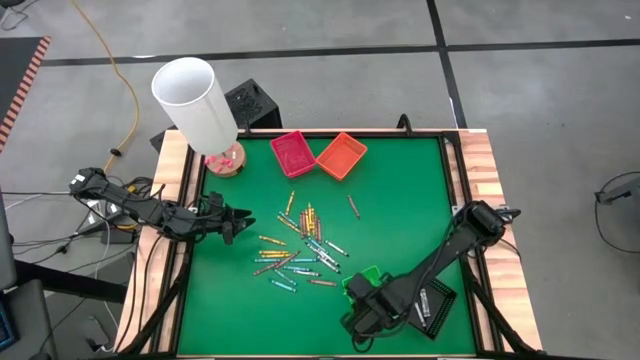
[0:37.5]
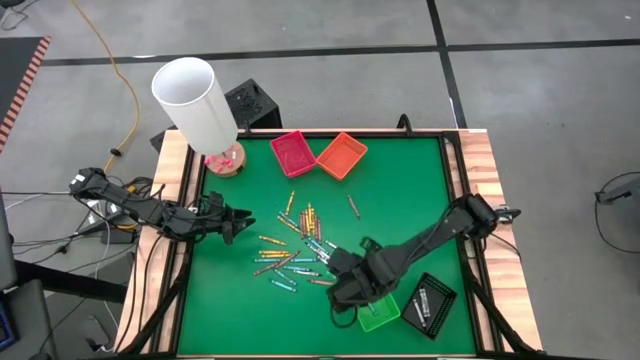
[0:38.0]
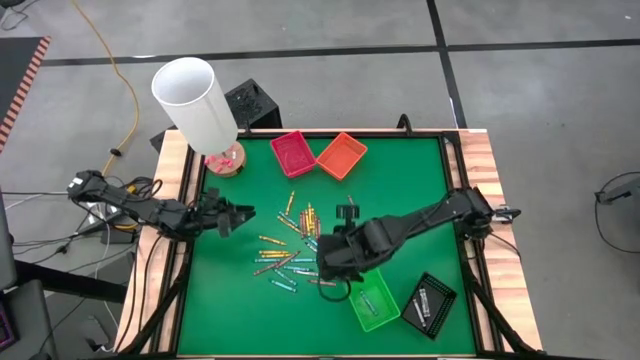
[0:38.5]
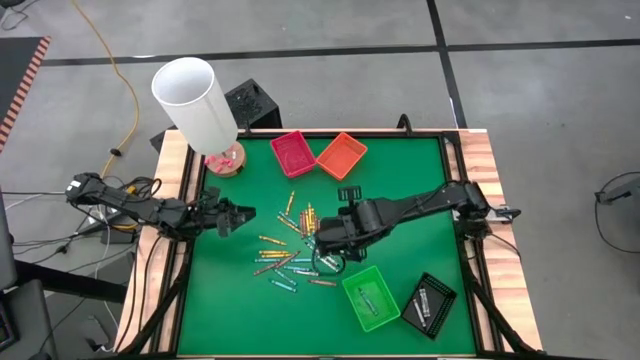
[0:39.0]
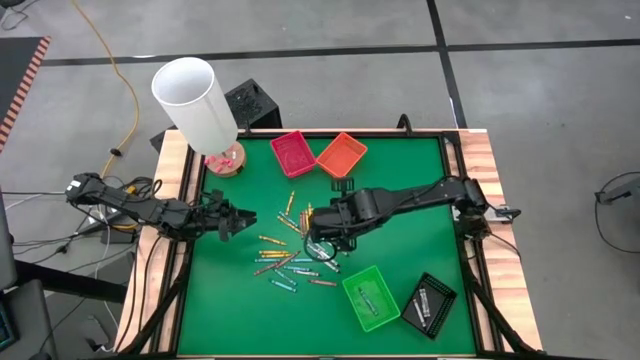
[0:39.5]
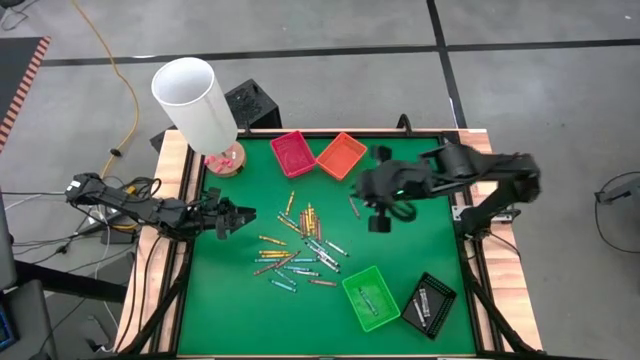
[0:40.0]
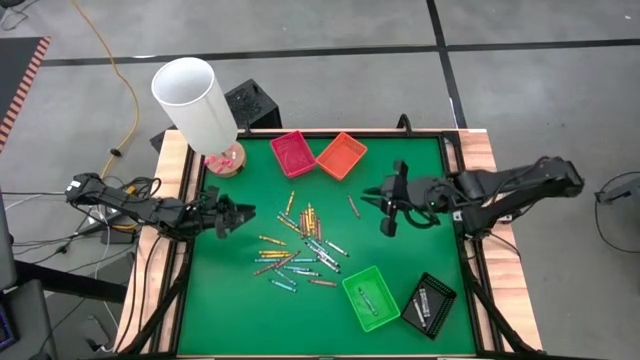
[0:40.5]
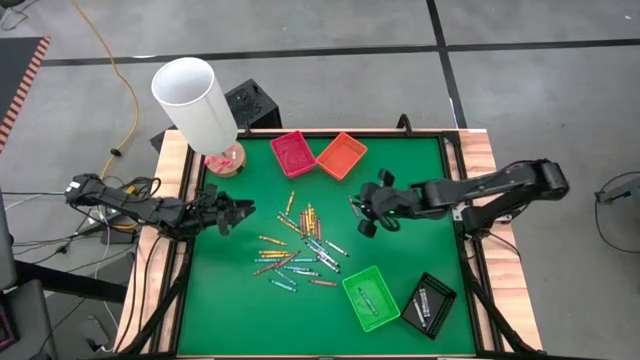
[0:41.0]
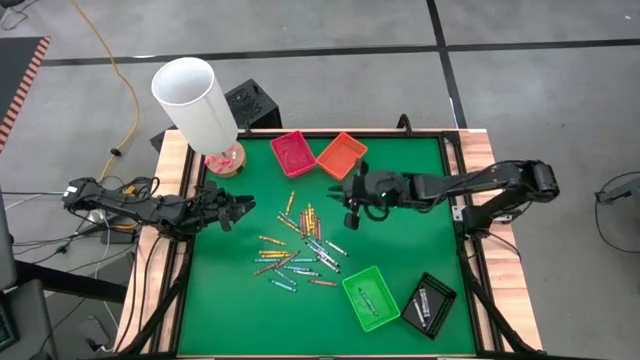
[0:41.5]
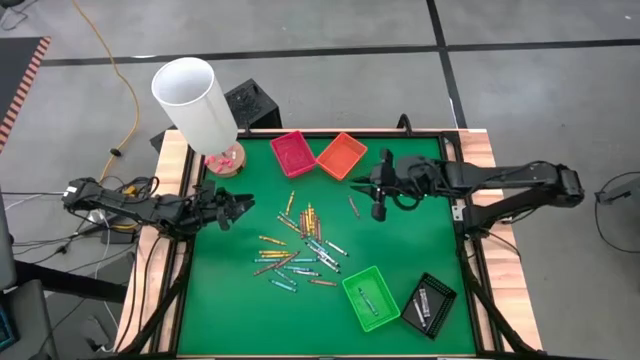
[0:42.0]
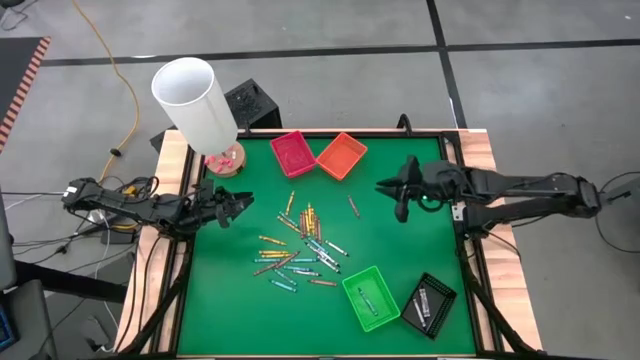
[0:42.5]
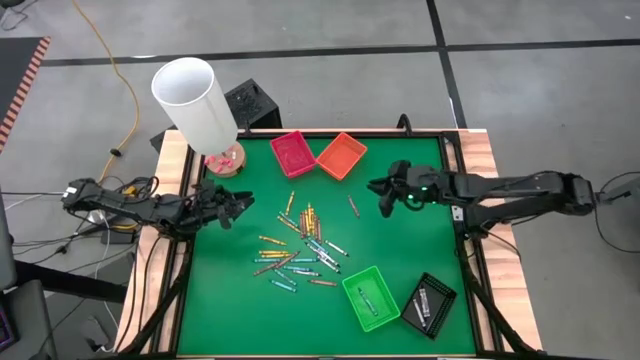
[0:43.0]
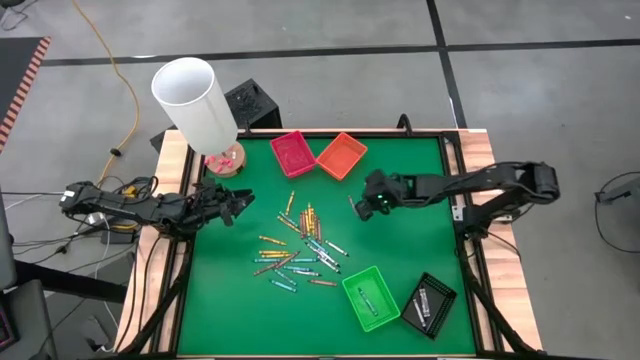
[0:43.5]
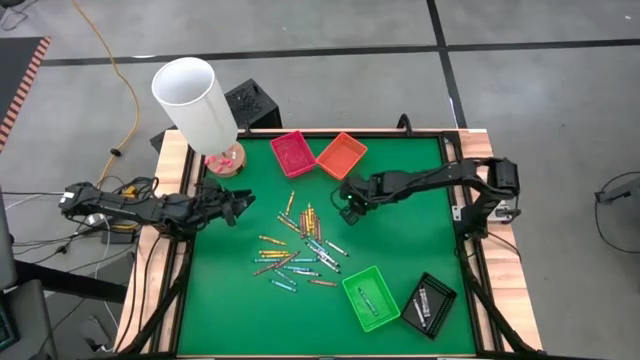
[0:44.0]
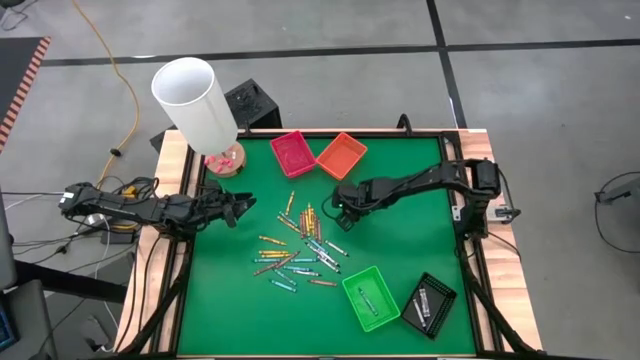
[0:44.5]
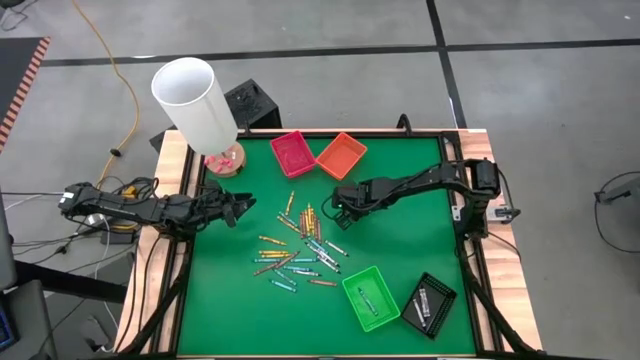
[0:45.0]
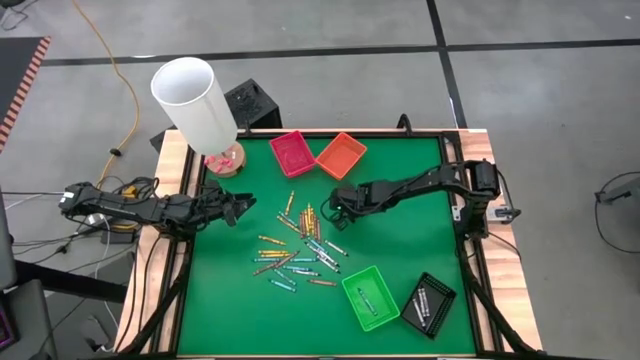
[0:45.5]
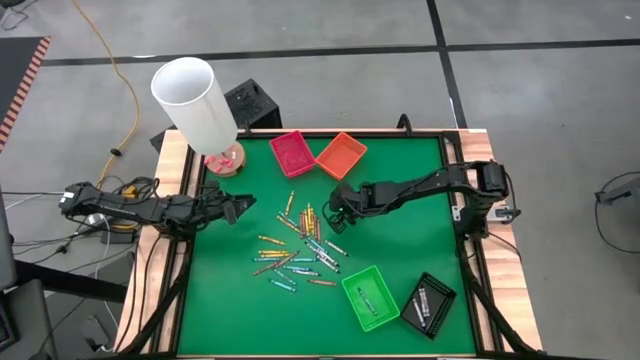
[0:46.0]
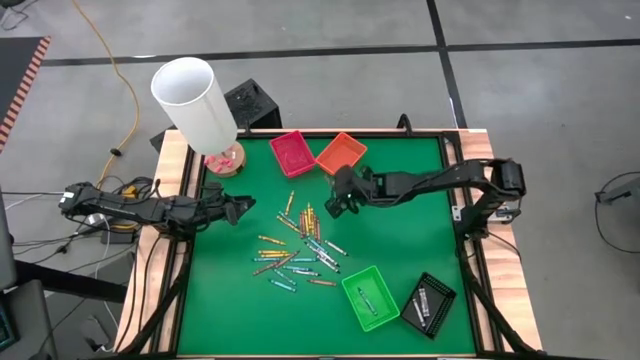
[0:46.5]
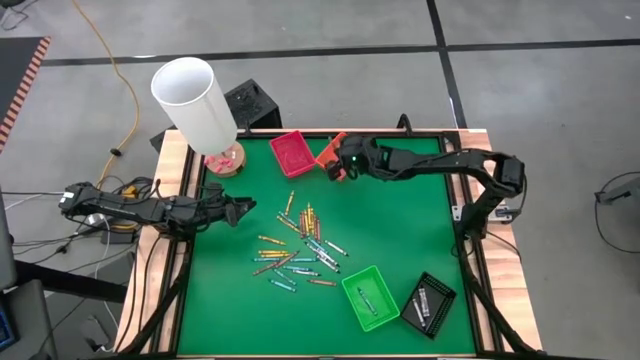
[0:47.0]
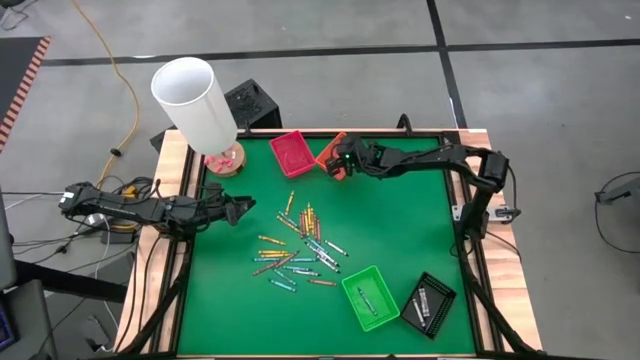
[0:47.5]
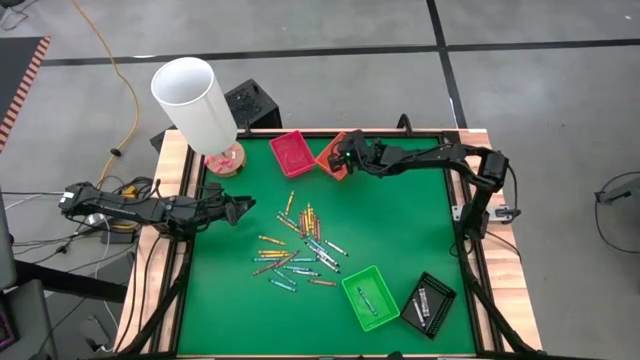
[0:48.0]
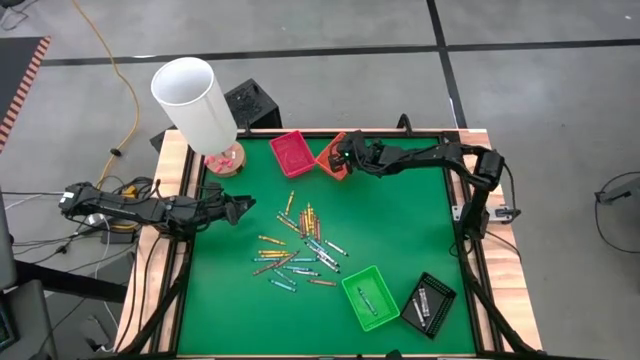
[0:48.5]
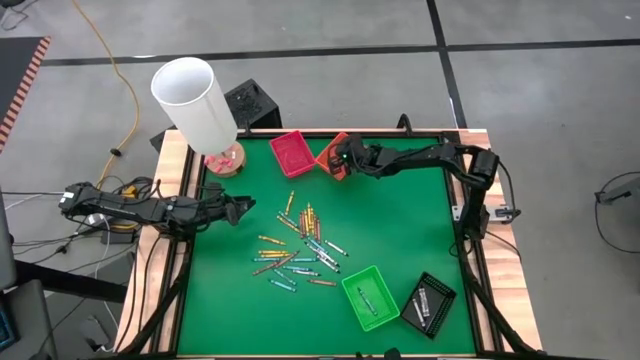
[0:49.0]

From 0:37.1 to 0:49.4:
Task: Sort crayons
Put the brown crayon into the orange bin

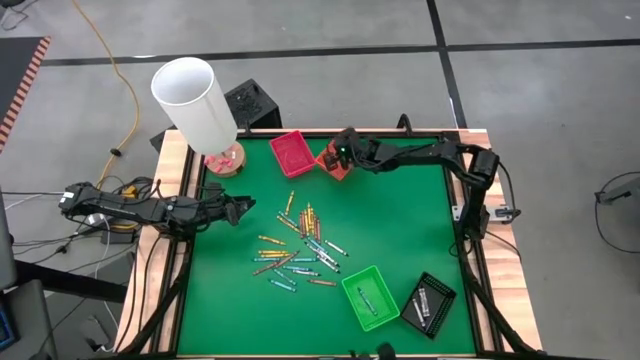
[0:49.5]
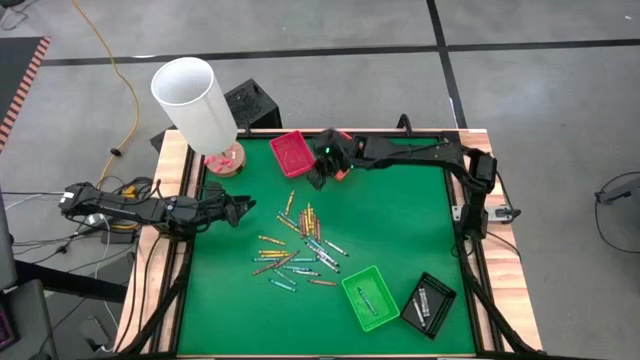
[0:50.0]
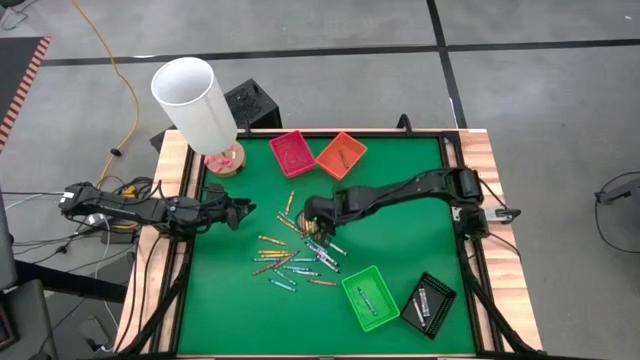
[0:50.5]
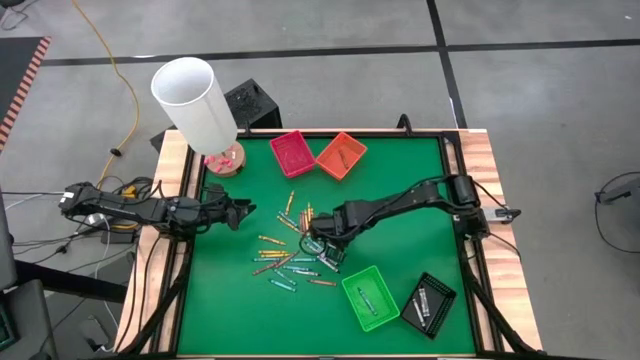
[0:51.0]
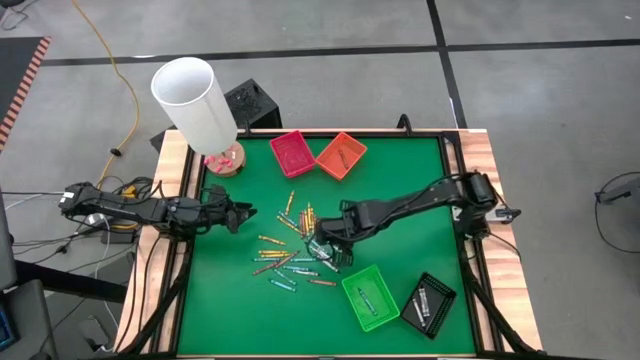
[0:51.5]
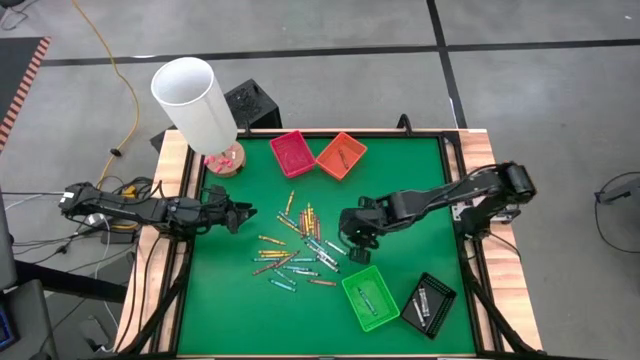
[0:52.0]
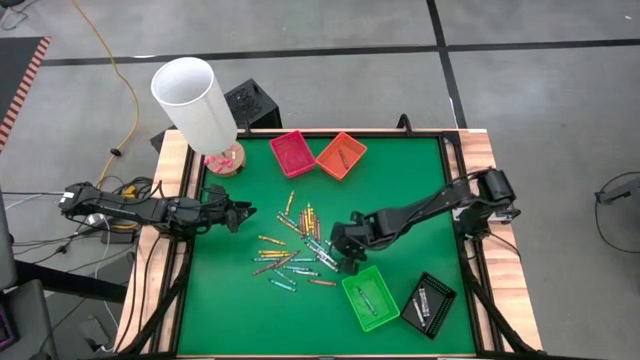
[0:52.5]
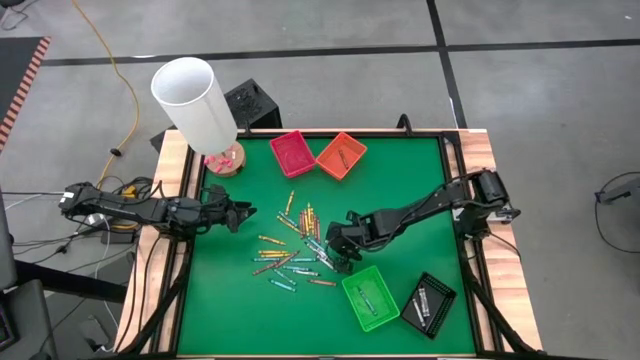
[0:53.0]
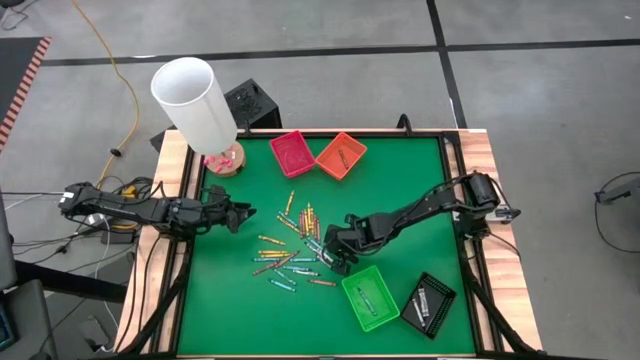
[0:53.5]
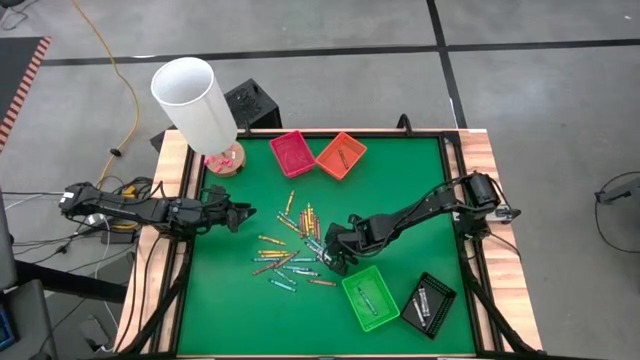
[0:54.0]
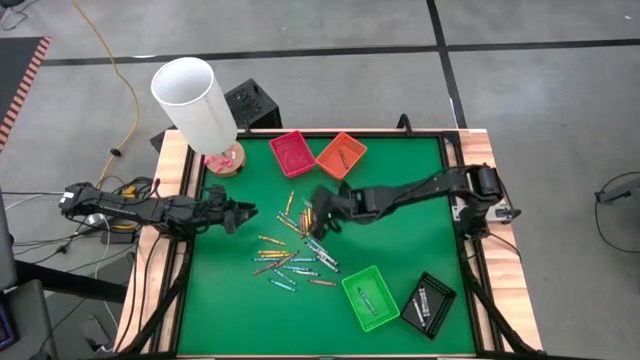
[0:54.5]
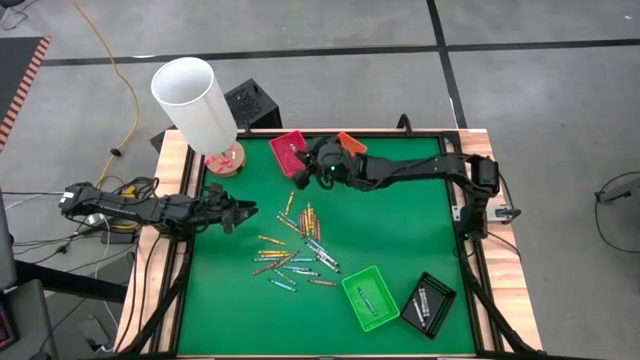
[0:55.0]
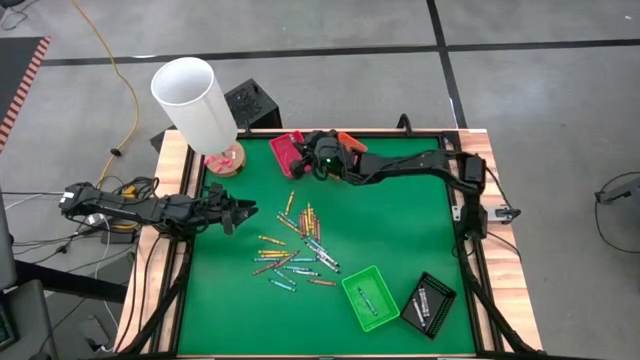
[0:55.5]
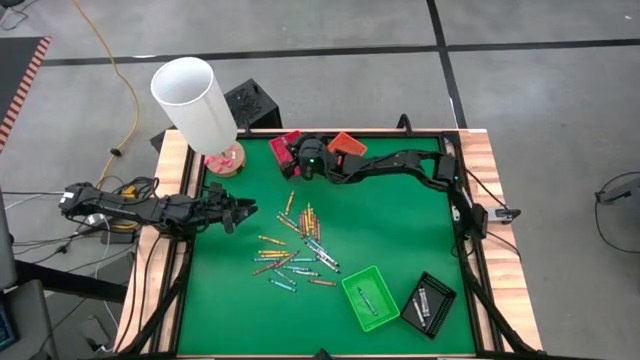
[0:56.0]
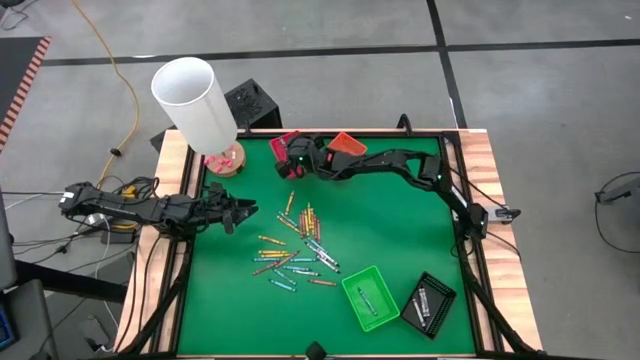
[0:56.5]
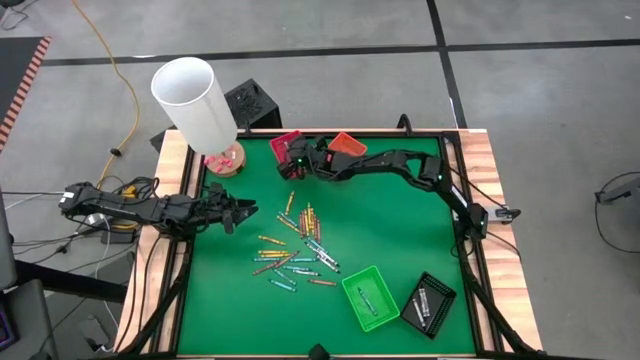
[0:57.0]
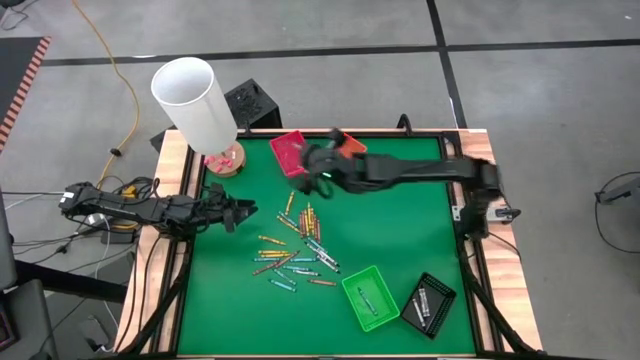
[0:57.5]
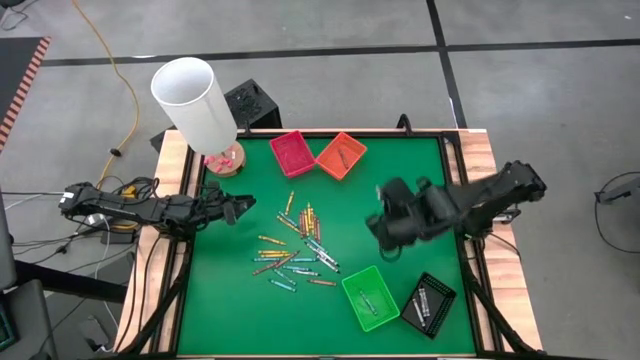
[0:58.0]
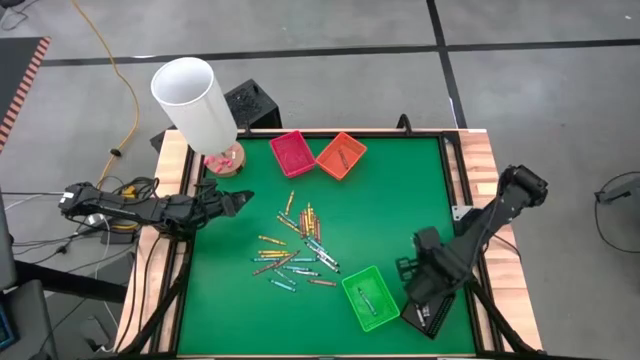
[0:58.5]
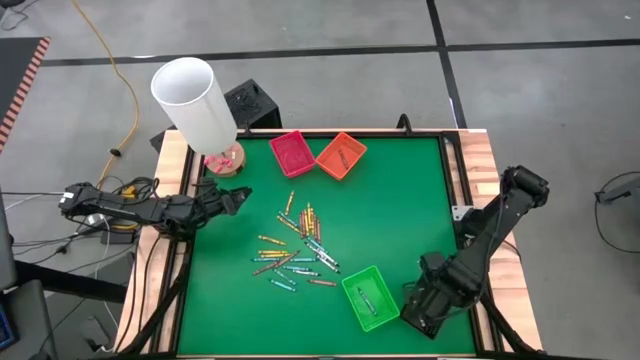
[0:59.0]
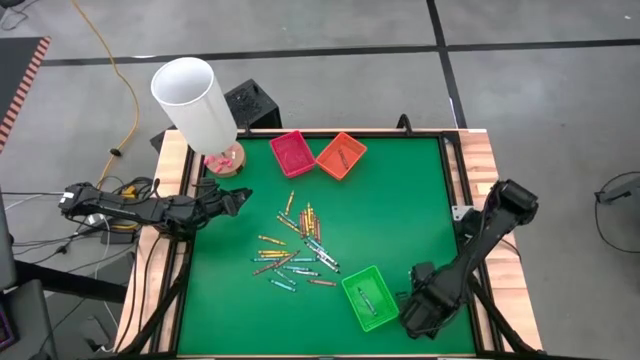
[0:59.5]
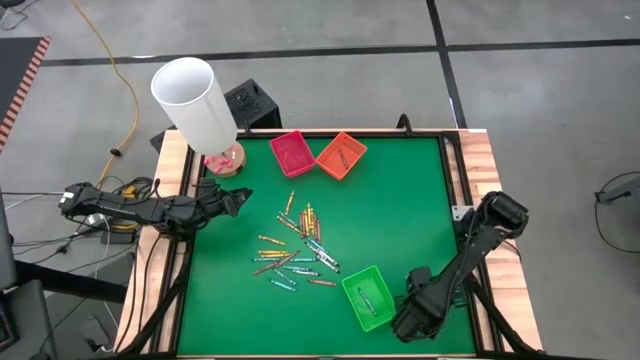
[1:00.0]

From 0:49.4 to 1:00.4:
Put the black crayon into the black bin
